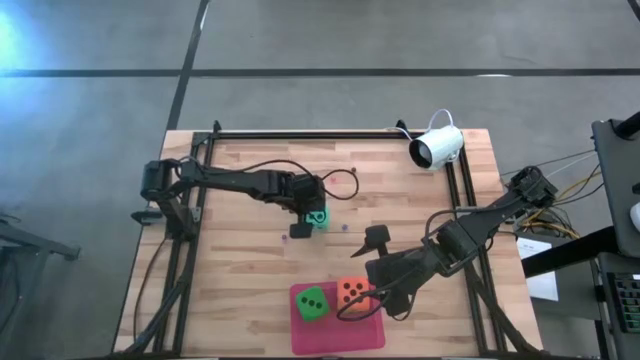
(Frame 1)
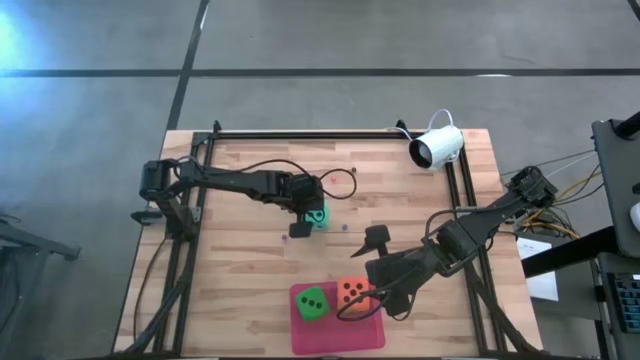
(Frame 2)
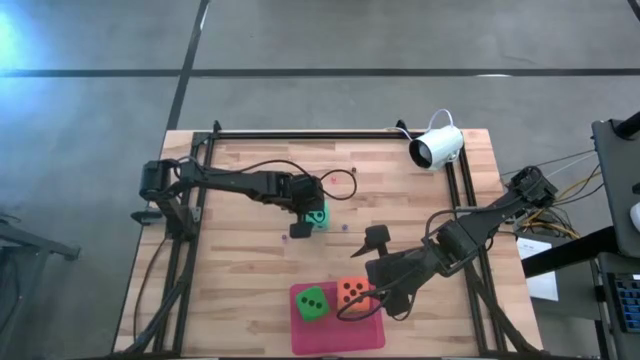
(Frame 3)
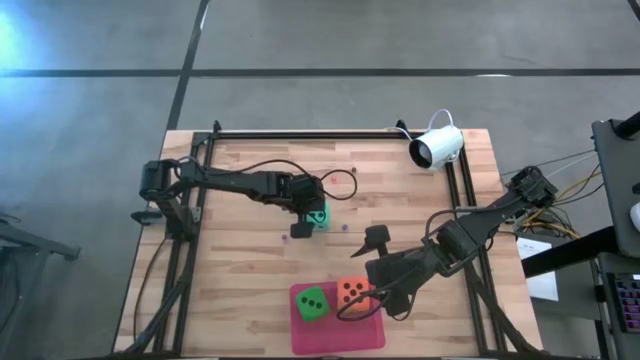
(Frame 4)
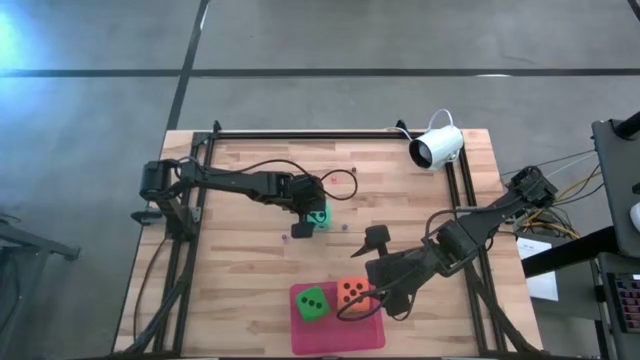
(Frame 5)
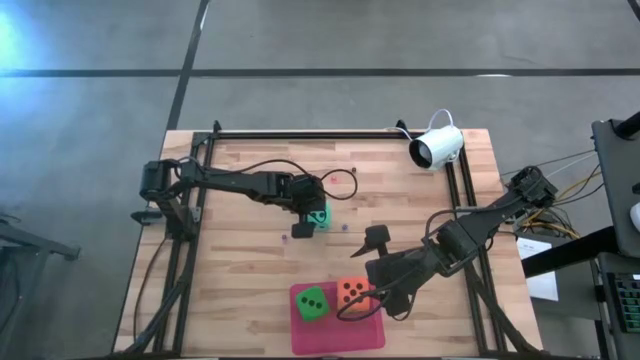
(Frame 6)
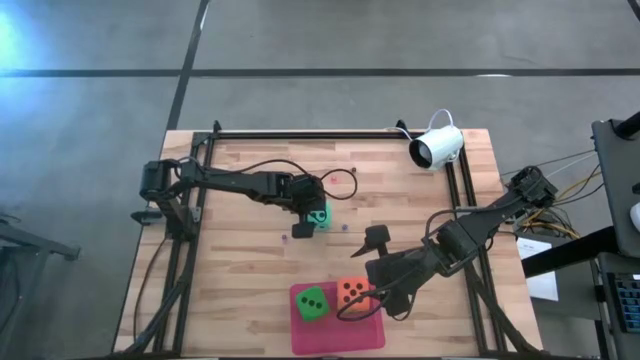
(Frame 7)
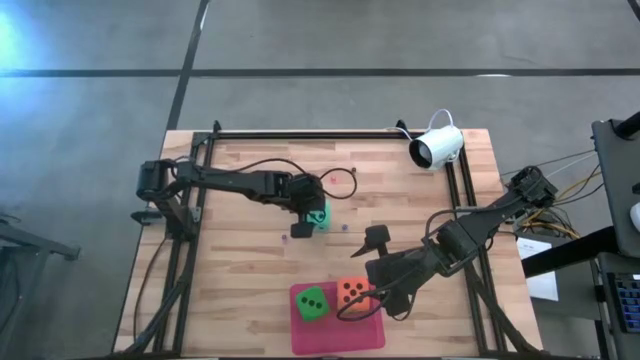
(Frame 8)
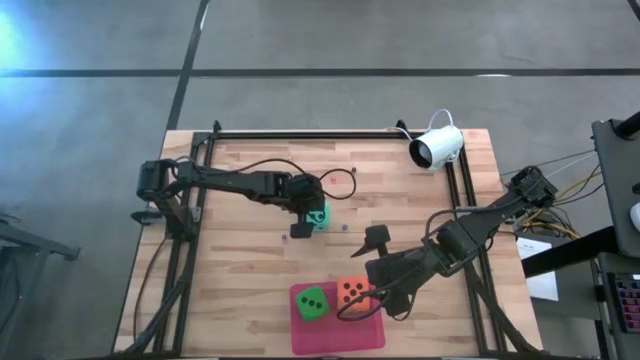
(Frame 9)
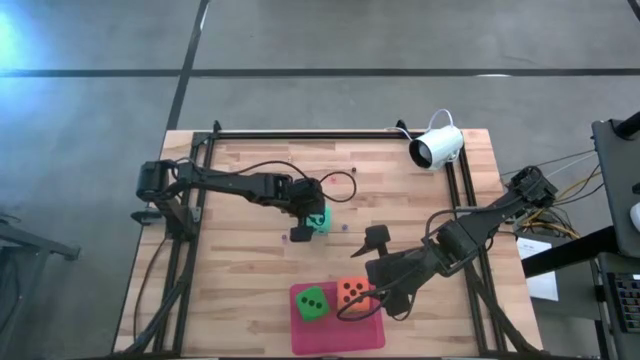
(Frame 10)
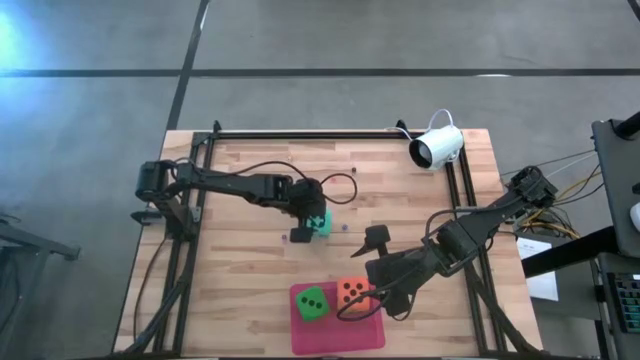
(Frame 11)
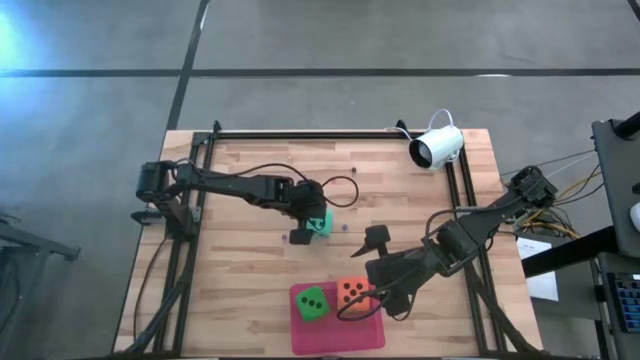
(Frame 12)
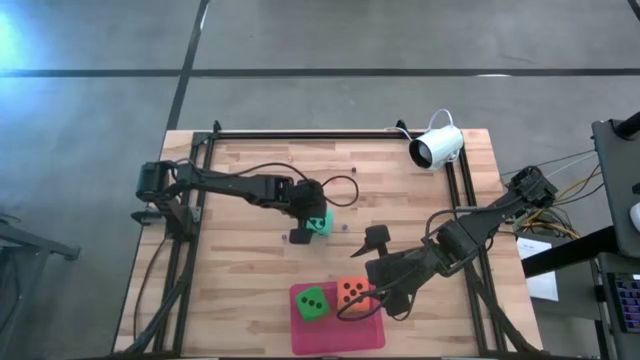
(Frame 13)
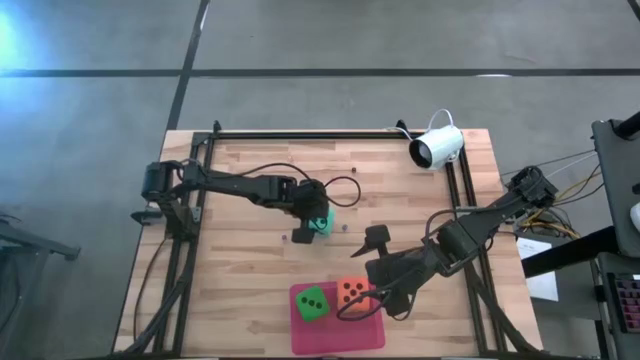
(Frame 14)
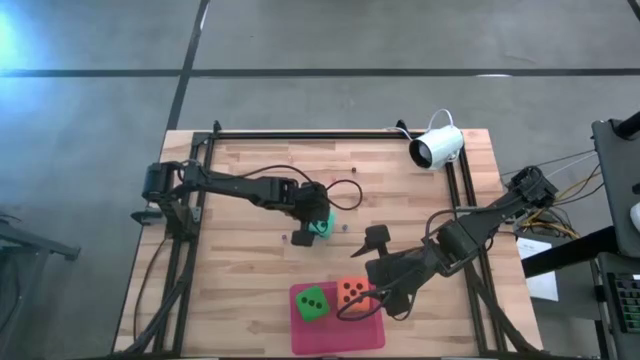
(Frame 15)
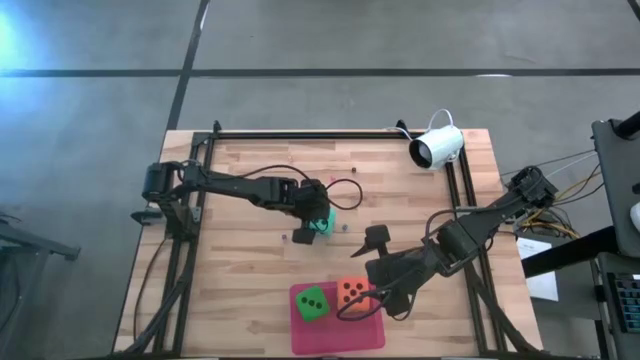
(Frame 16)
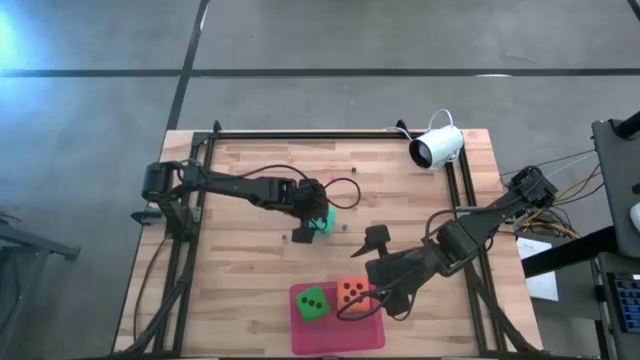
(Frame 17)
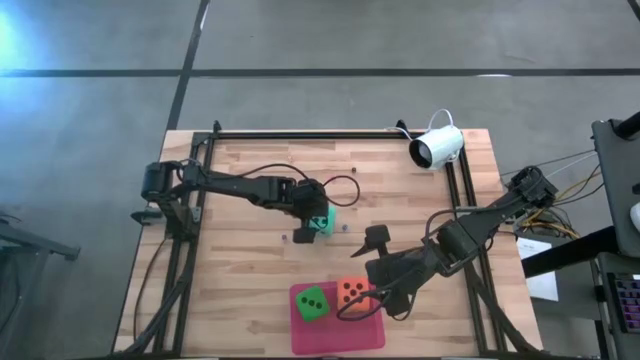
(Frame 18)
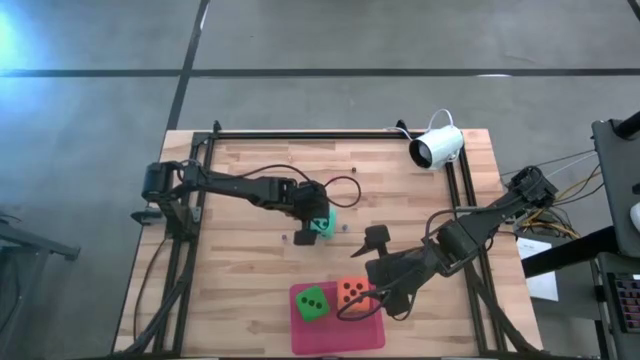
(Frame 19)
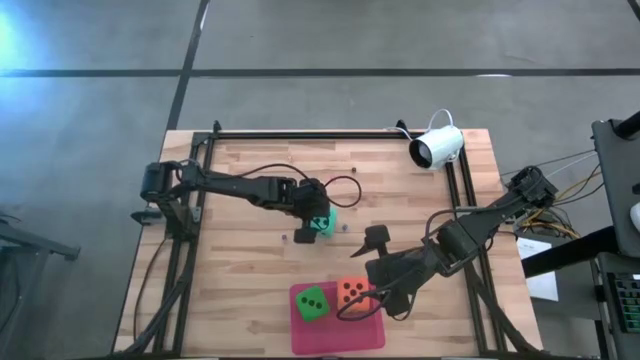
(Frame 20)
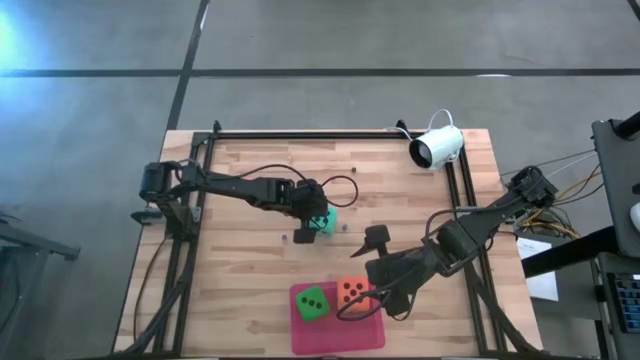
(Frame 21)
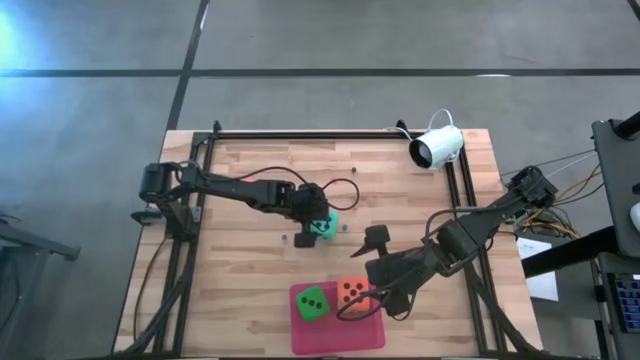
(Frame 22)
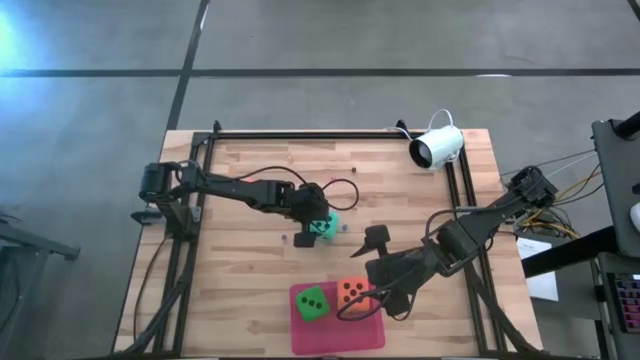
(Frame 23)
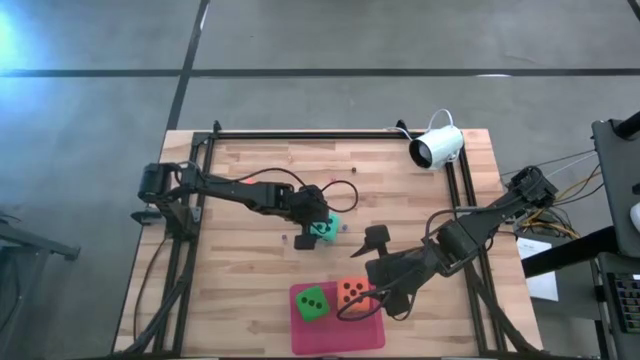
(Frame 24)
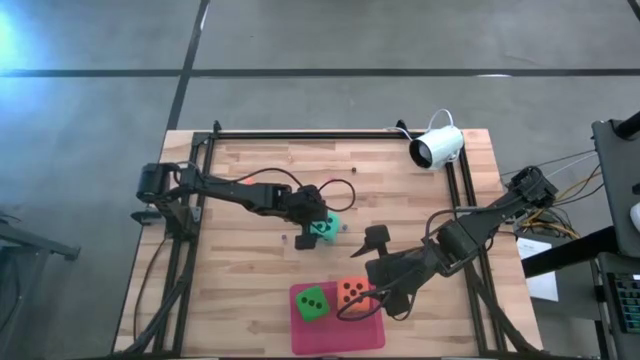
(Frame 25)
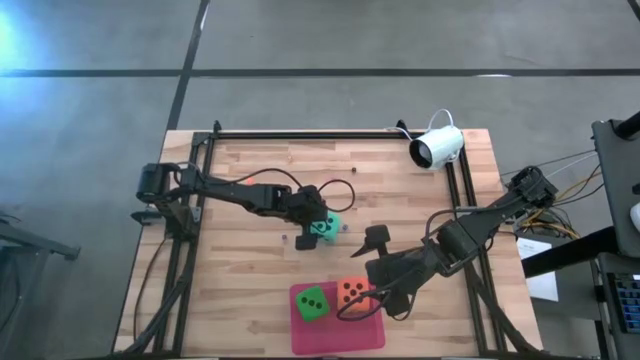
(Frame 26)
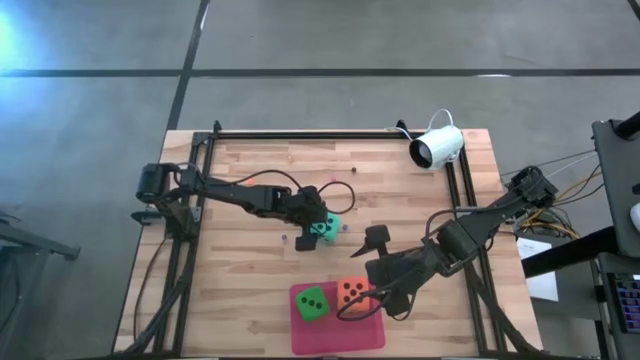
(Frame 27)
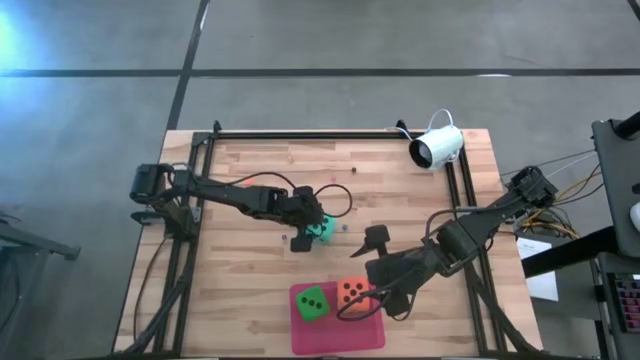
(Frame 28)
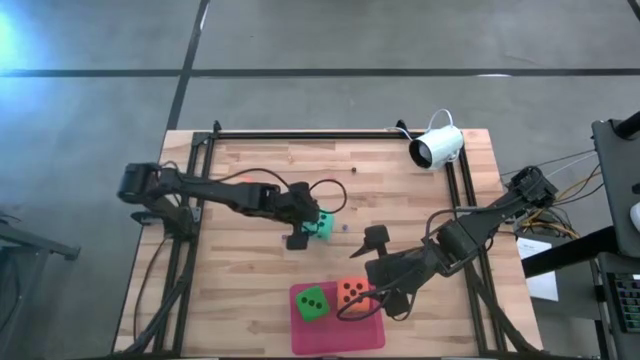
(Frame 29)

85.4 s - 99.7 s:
Task: Pick & Place Dice
Put the light blue dice into the pink bin

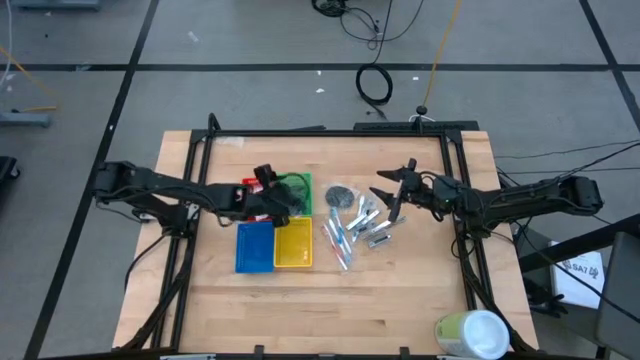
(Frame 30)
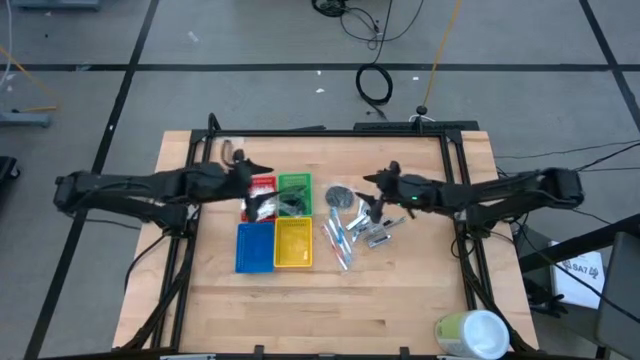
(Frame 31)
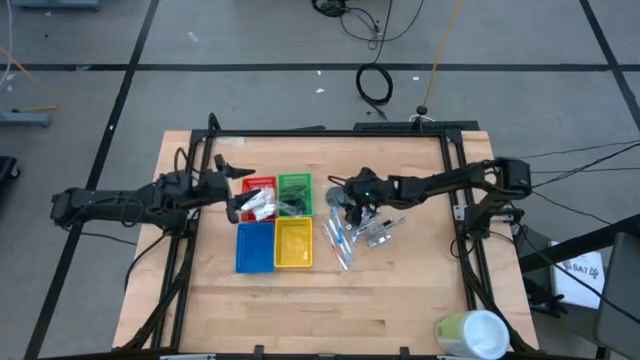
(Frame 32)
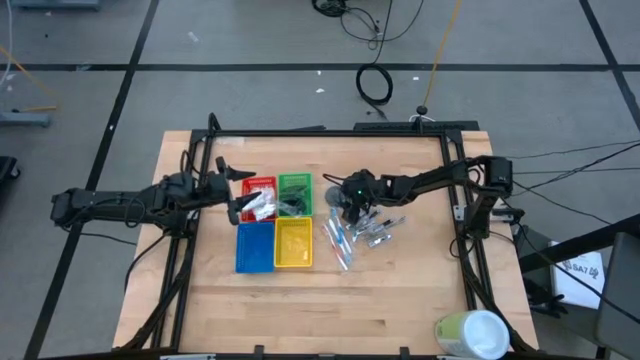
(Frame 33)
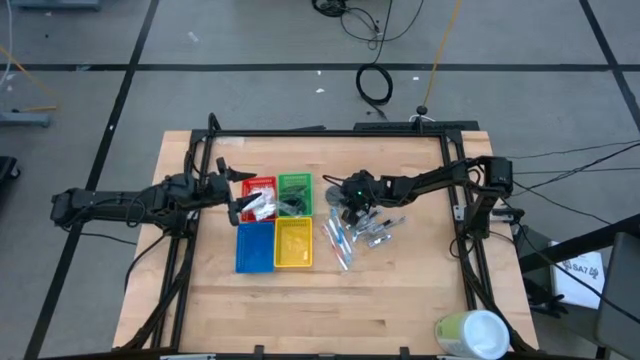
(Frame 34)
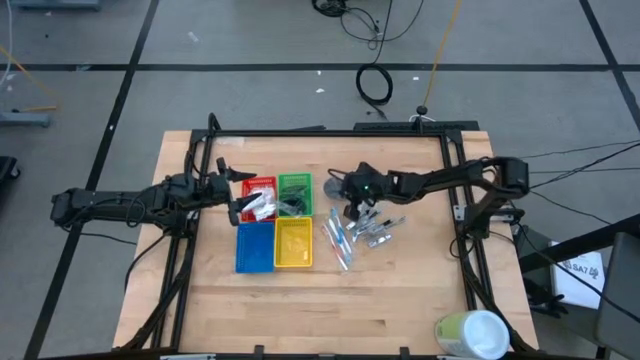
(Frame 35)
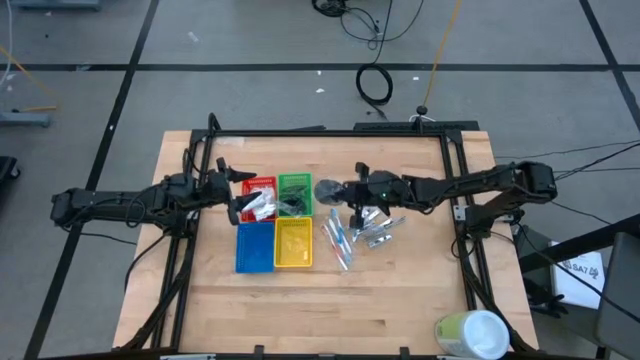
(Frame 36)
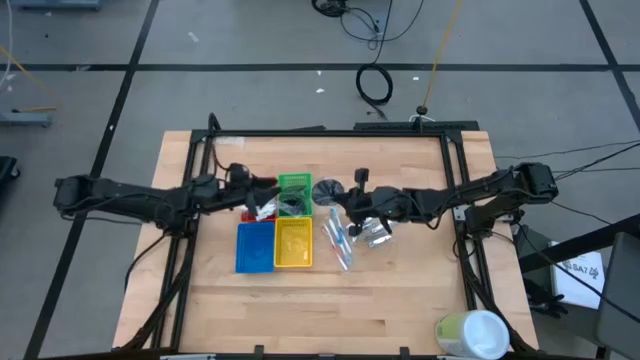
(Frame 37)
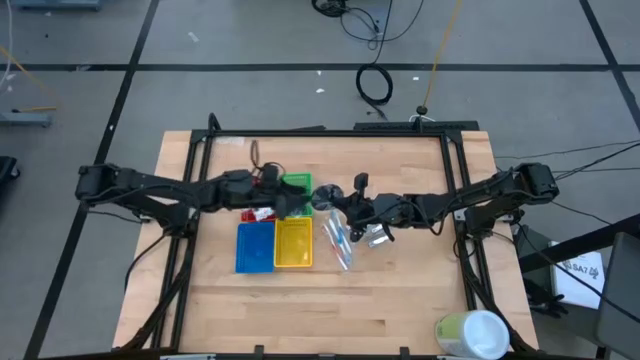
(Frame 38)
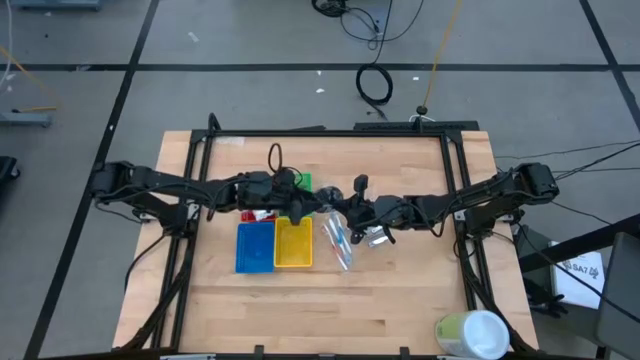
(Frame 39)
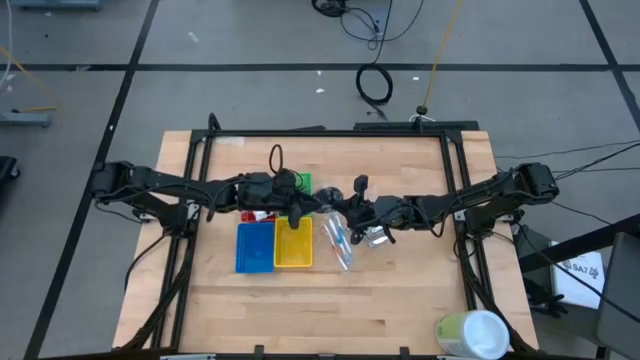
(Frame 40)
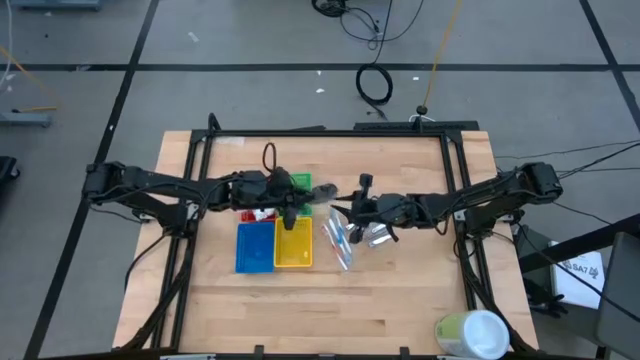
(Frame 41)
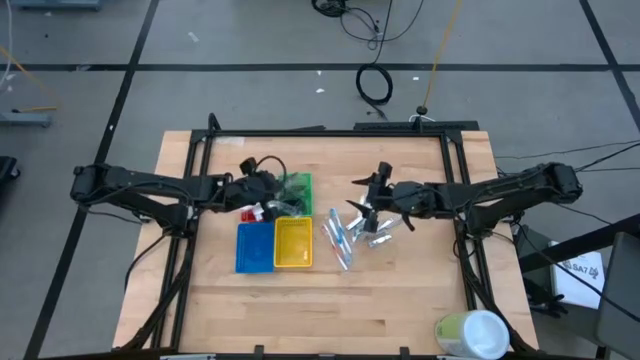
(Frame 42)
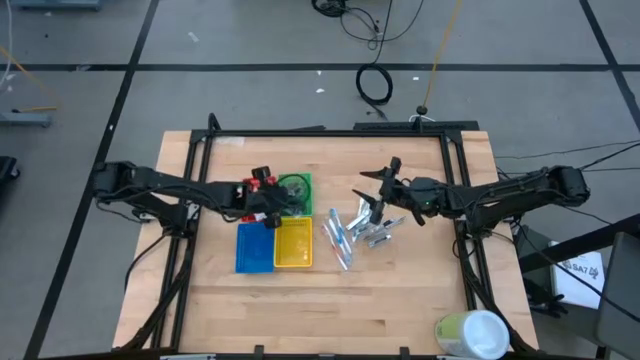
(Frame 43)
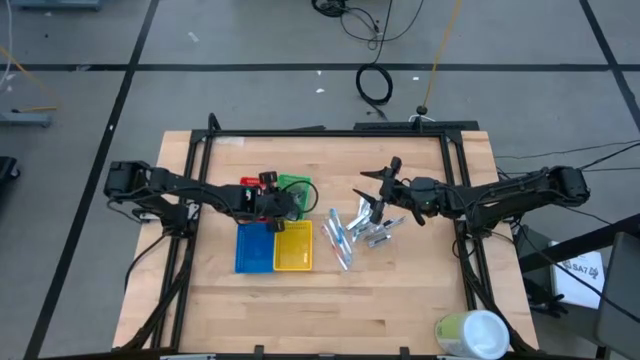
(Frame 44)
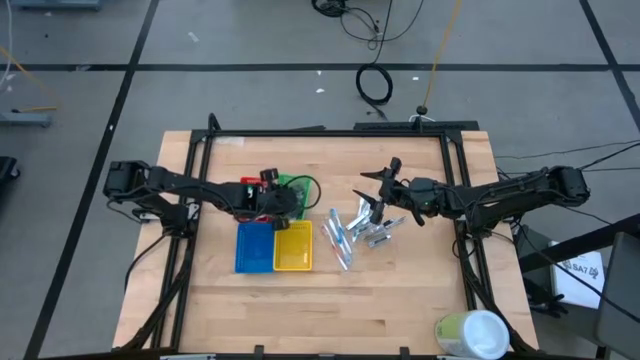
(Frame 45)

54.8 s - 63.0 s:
Task: Pick & Place Travel size toiletries
Put the black hairbrush into the green bin
